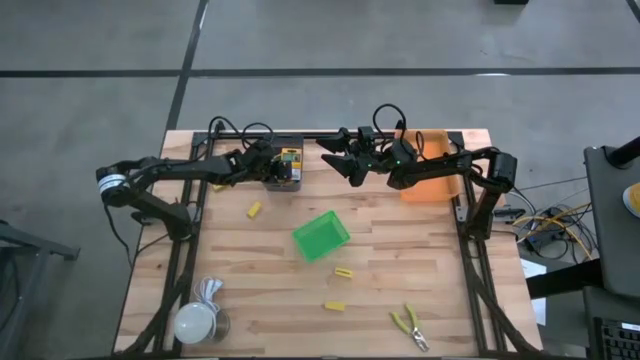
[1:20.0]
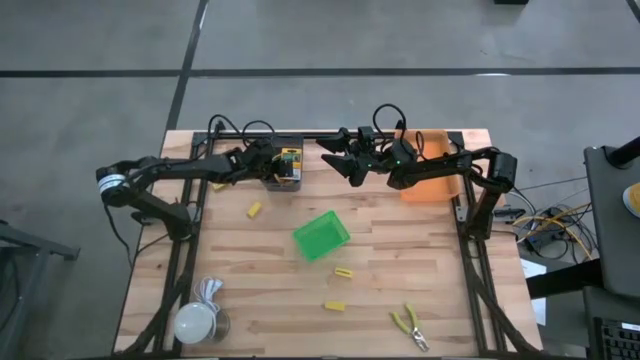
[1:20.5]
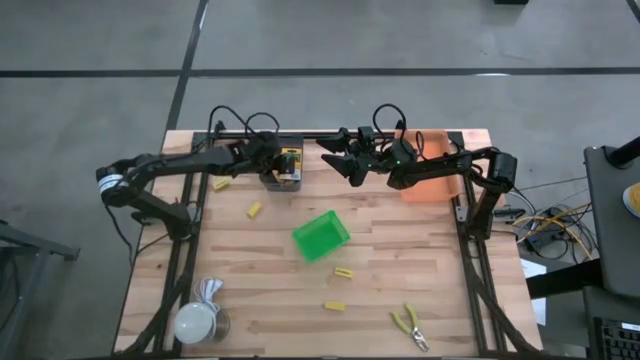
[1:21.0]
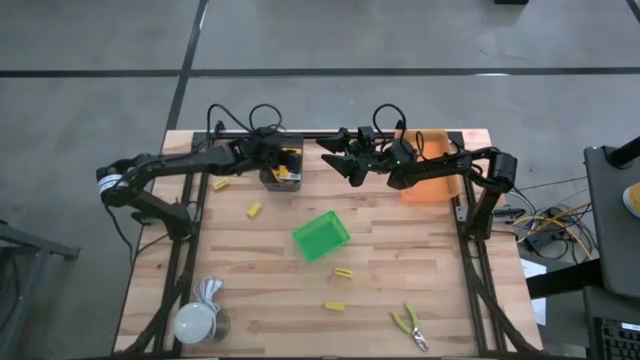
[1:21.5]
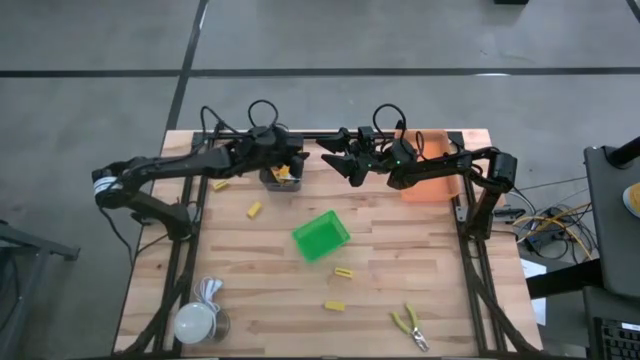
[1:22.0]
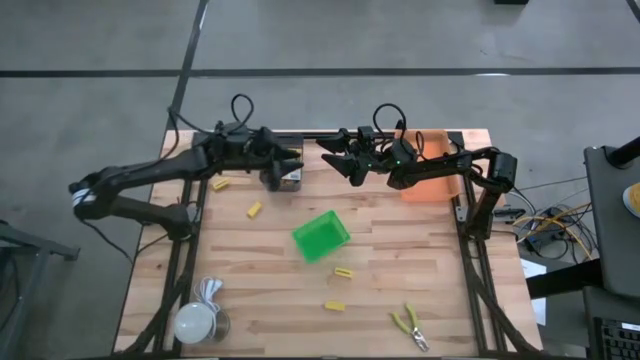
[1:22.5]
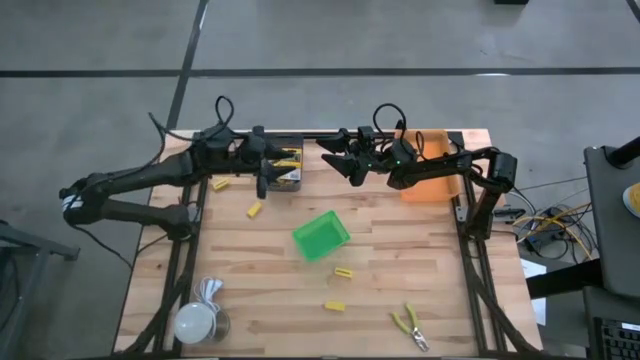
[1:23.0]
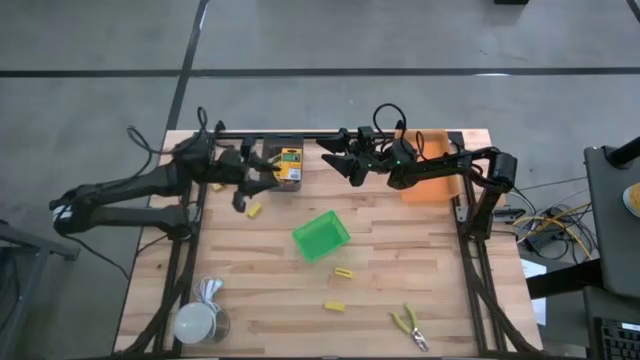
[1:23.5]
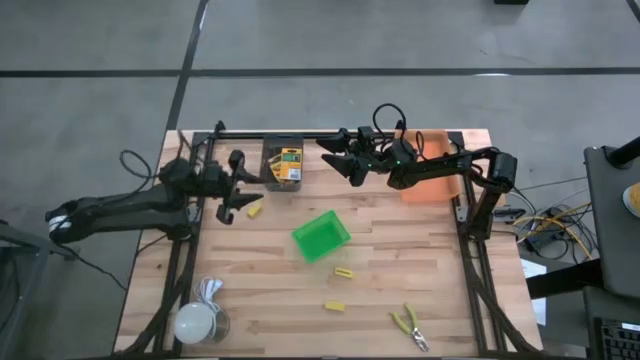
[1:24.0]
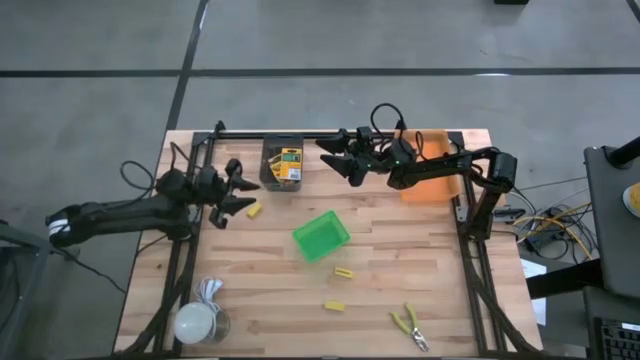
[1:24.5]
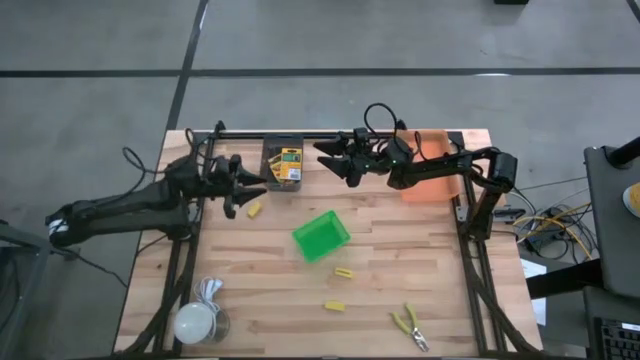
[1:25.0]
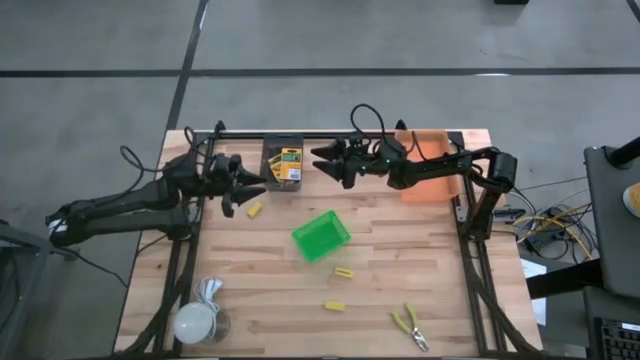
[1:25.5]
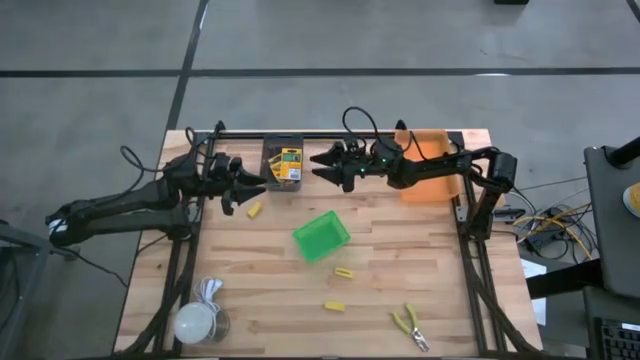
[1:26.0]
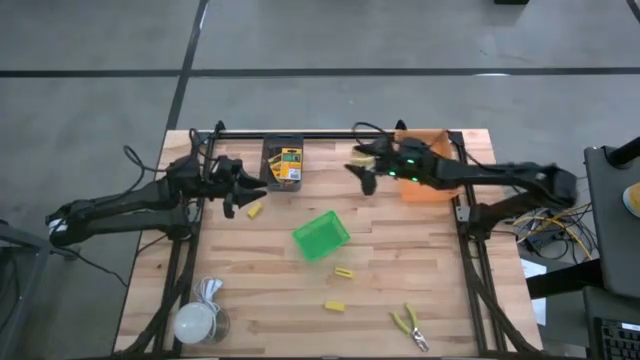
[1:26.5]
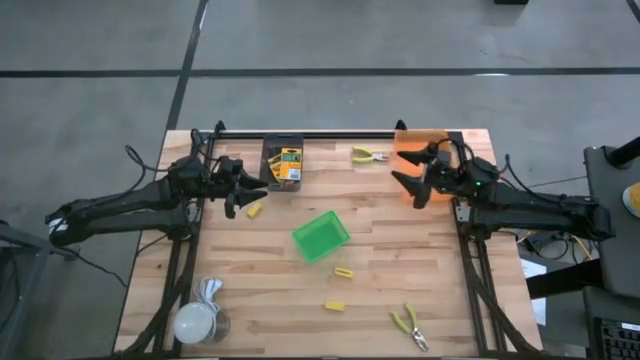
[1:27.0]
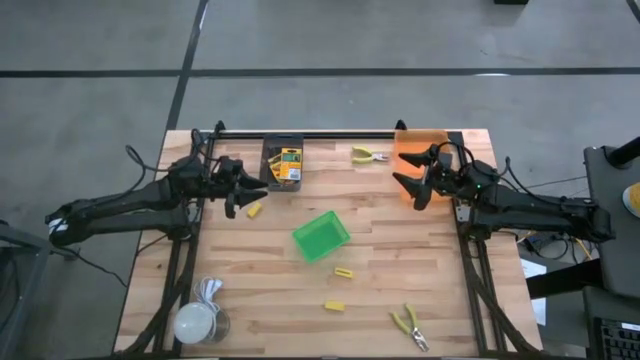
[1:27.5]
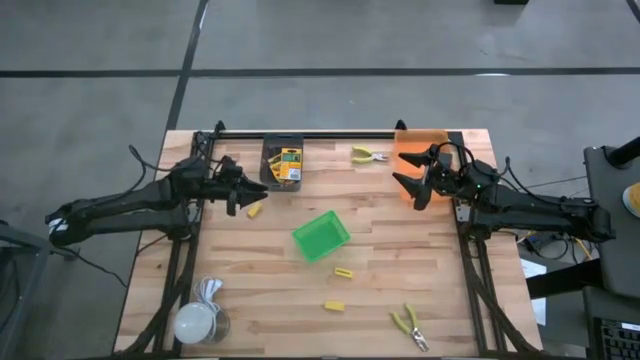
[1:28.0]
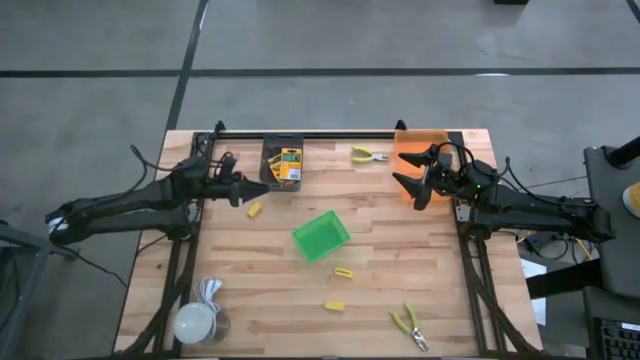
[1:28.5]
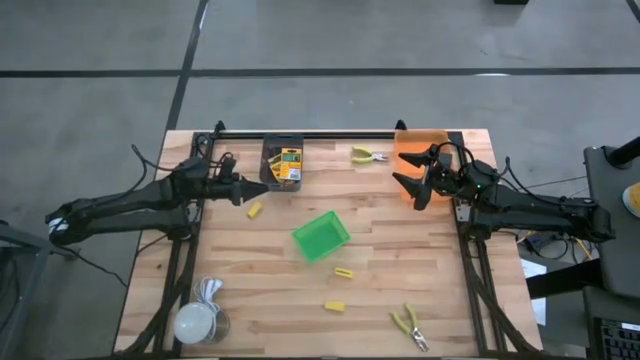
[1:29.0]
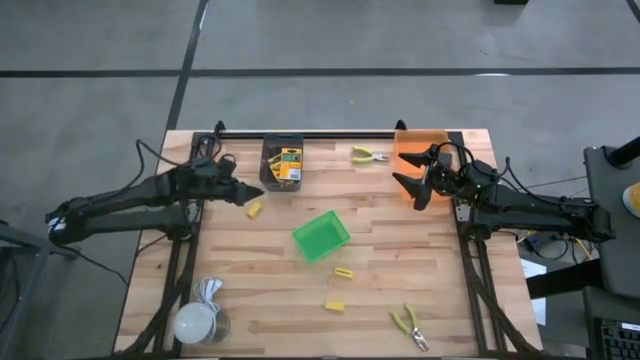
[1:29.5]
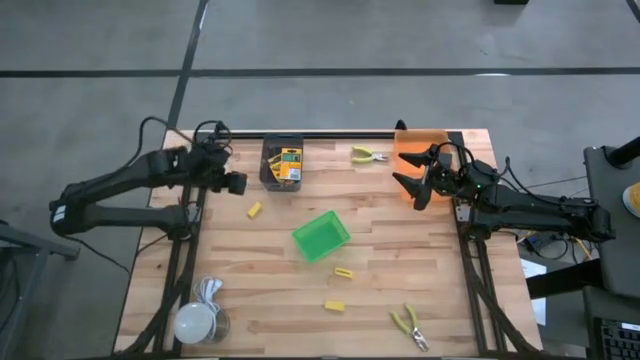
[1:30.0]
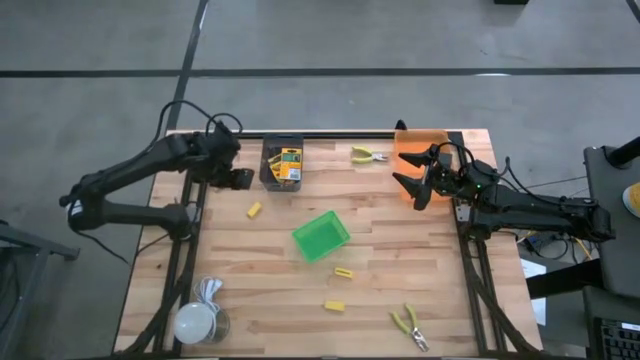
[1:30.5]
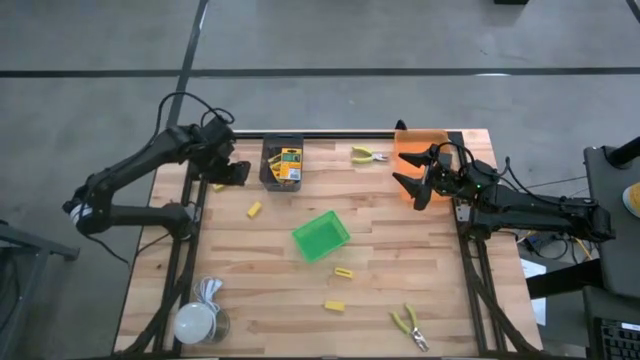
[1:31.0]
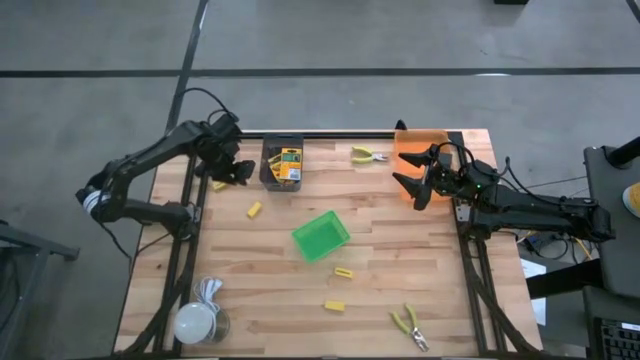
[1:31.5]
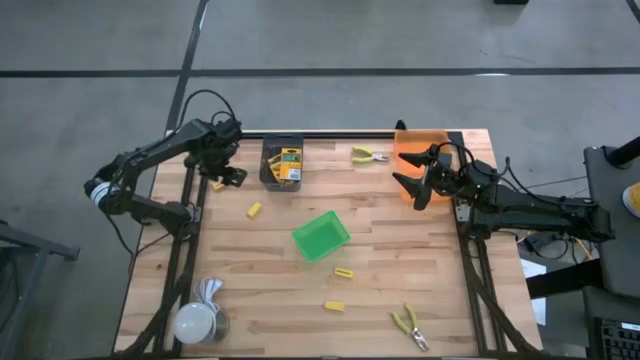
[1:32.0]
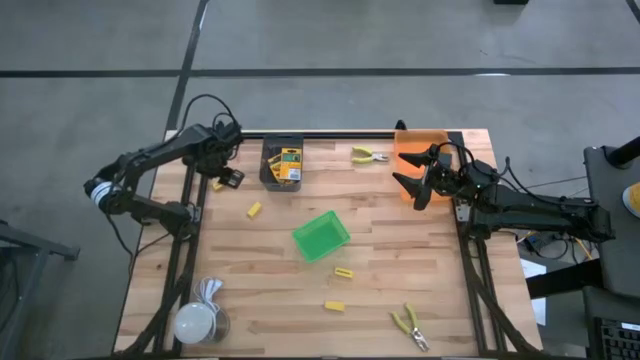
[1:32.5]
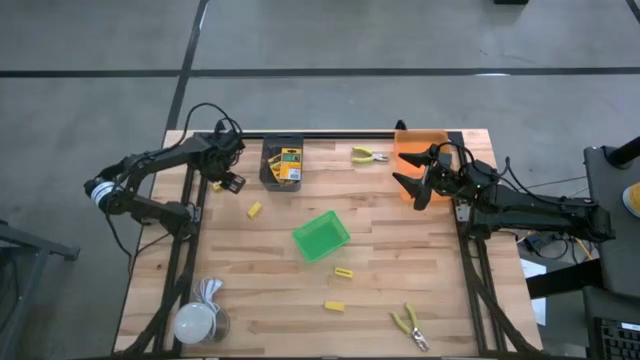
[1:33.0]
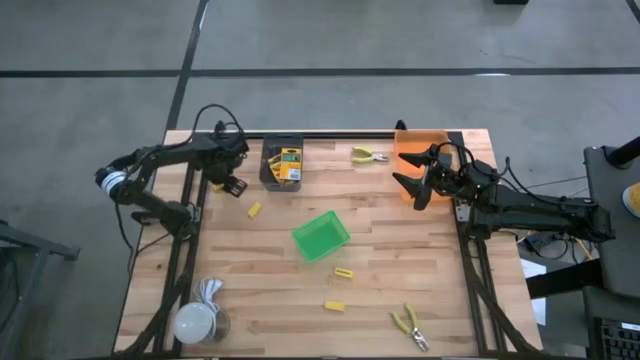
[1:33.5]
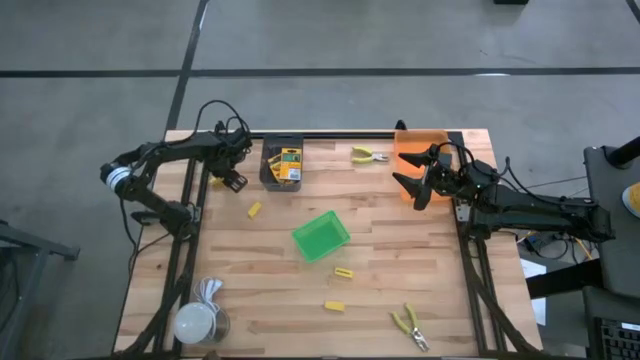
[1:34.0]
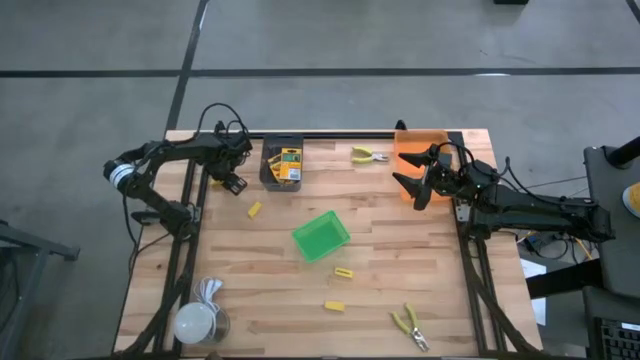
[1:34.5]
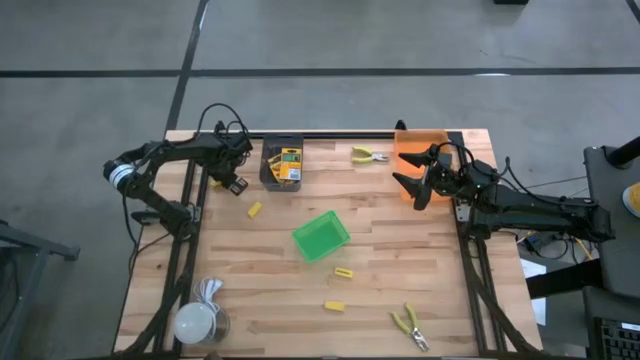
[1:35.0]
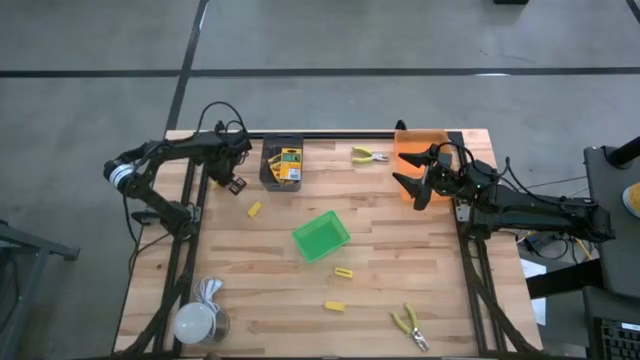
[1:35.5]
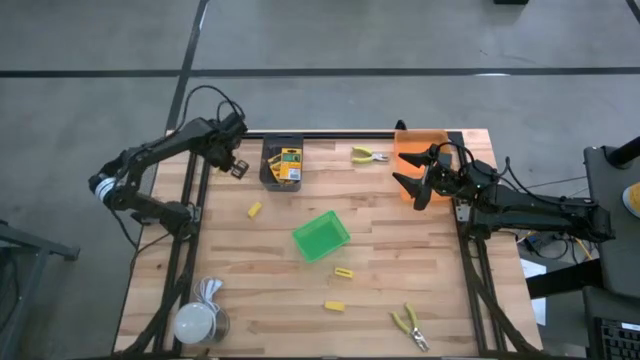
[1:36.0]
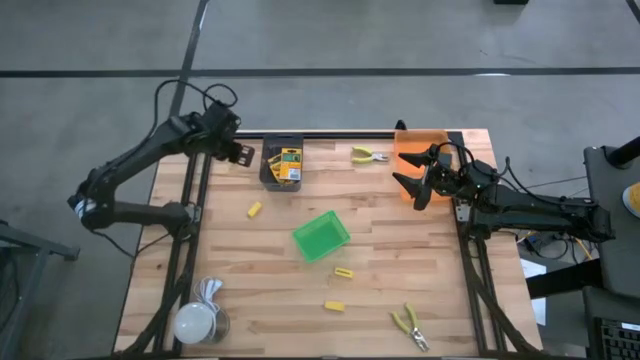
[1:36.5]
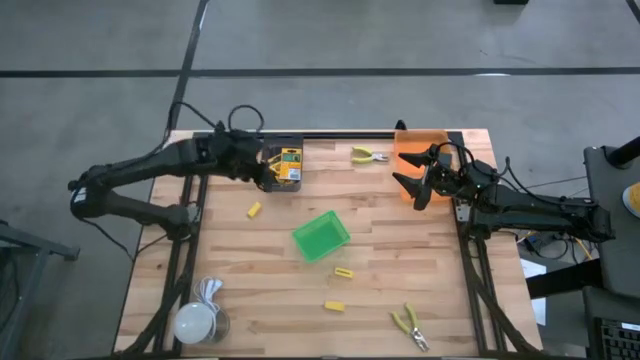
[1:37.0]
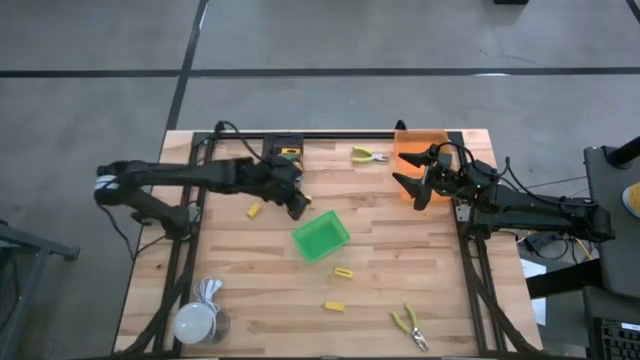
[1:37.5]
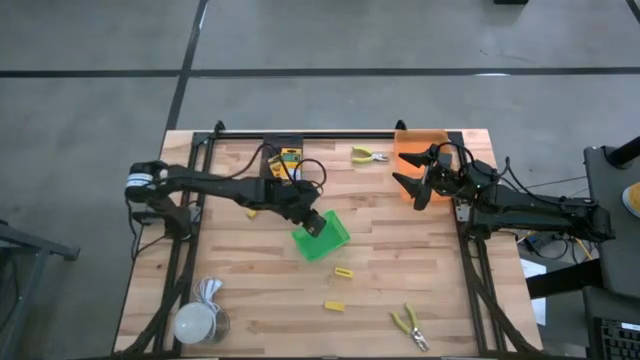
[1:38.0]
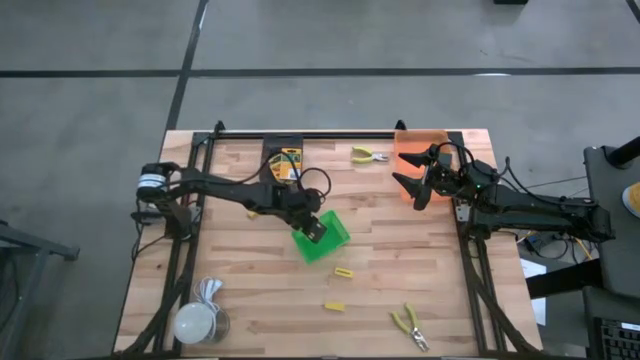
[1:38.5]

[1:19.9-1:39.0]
Task: Pick & Place School Supplies
Put the yellow eraser into the green bin

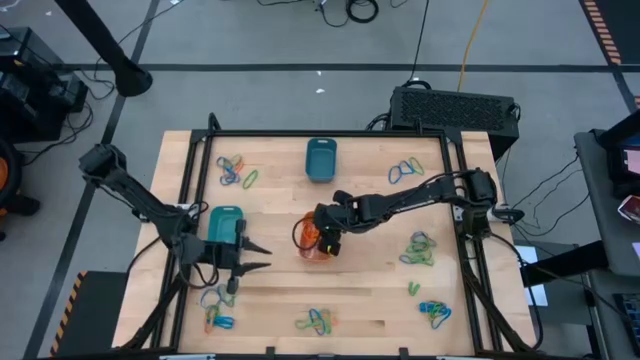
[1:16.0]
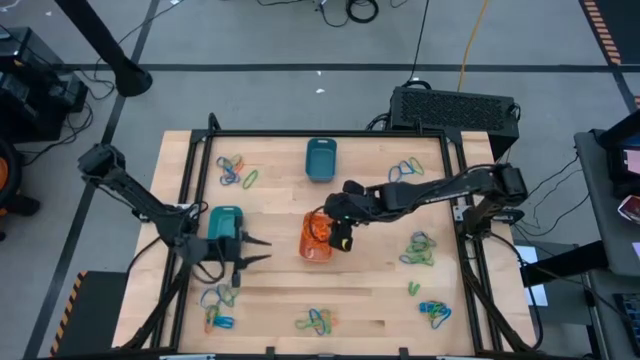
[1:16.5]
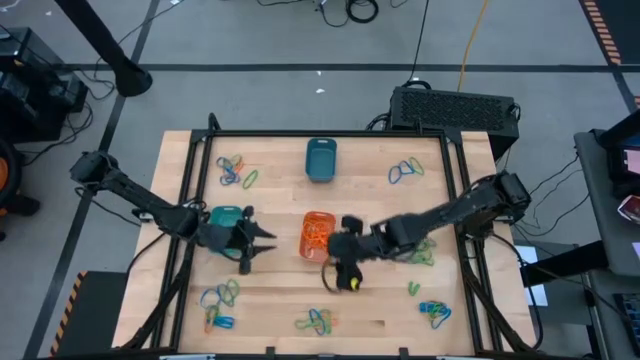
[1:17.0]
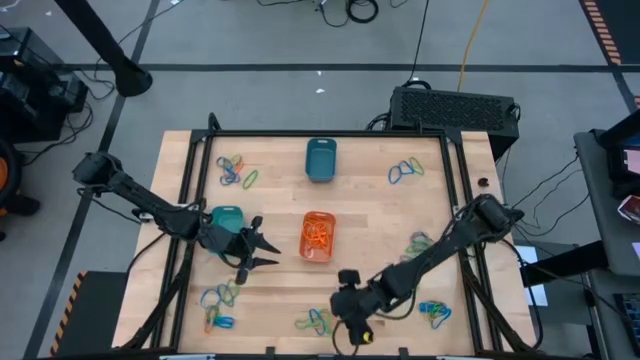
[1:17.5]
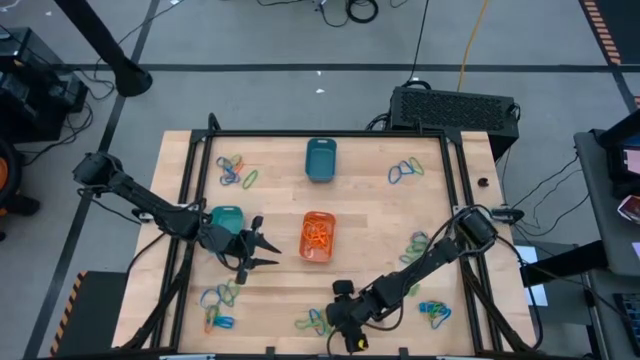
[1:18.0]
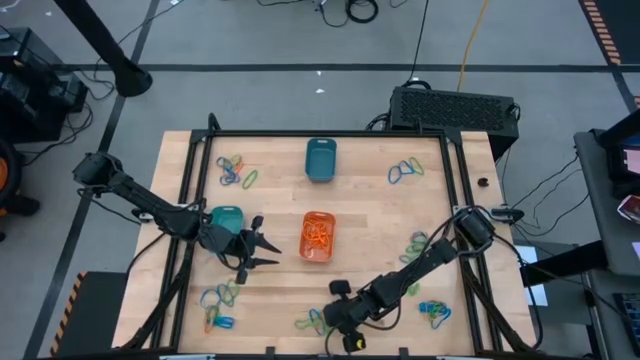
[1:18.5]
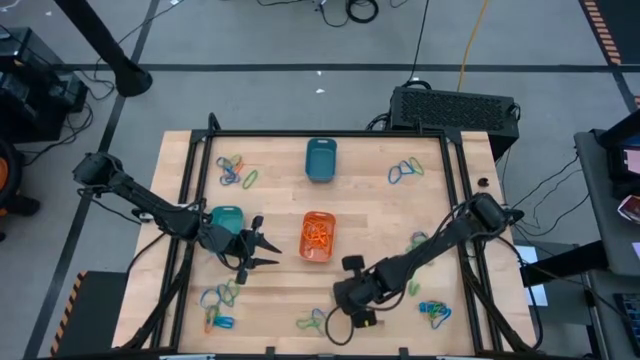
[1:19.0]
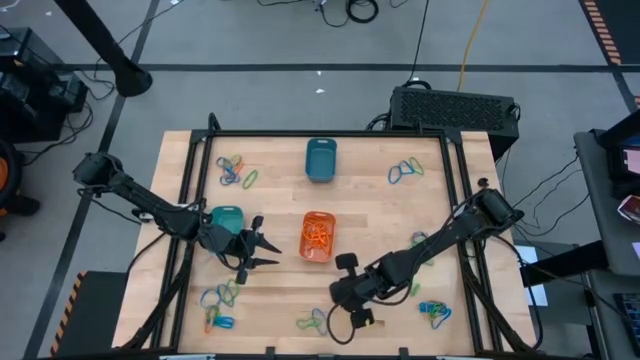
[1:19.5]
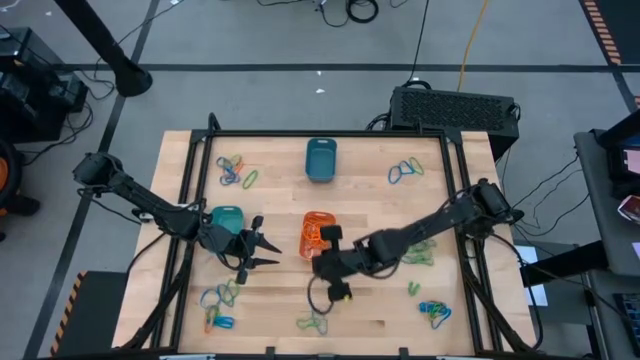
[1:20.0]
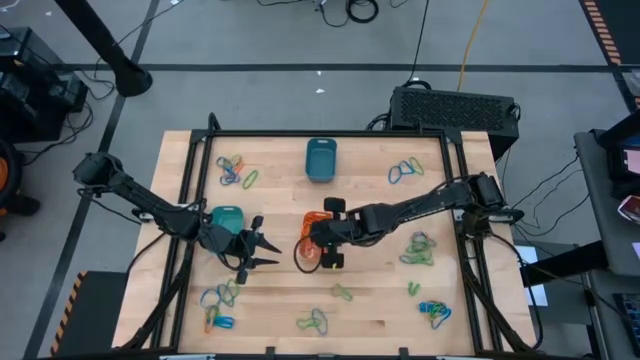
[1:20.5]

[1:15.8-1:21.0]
Task: Sort rubber bands into baskets
Put the orange rubber band into the orange bin
